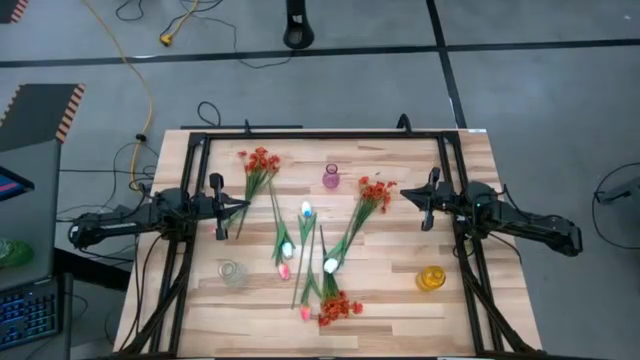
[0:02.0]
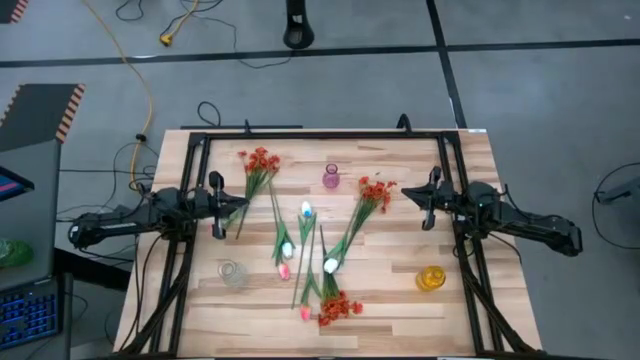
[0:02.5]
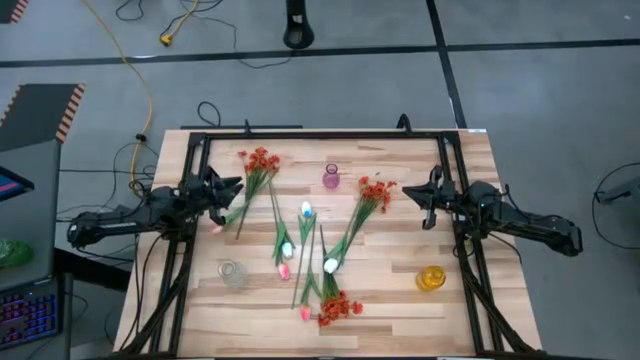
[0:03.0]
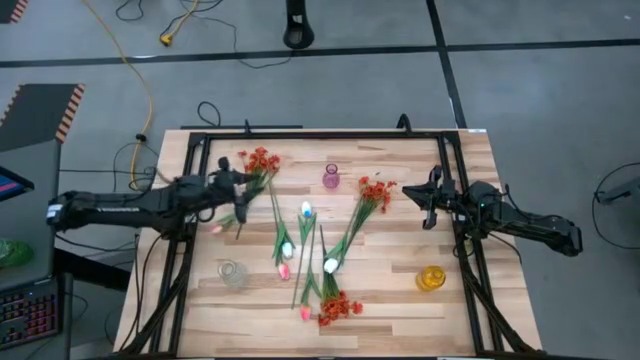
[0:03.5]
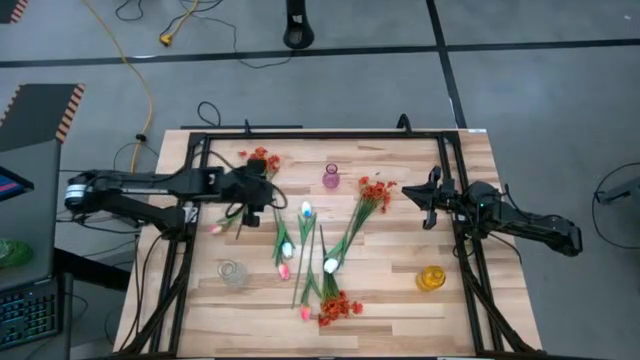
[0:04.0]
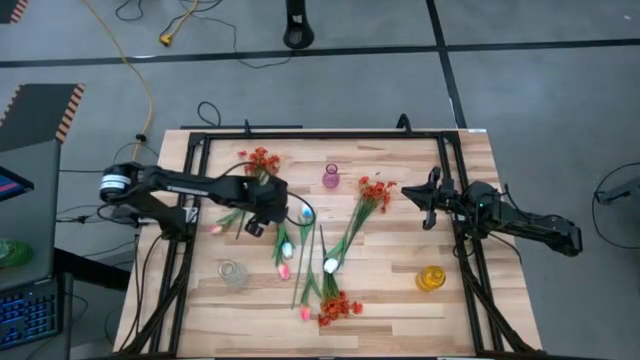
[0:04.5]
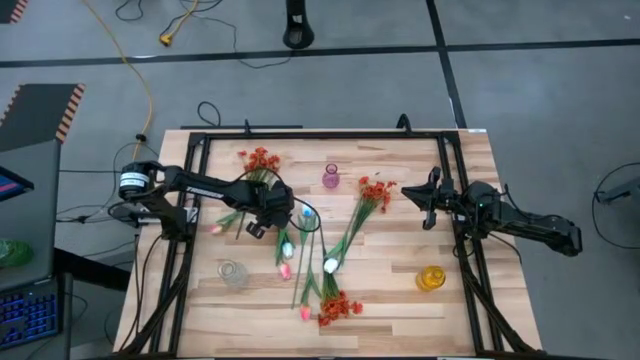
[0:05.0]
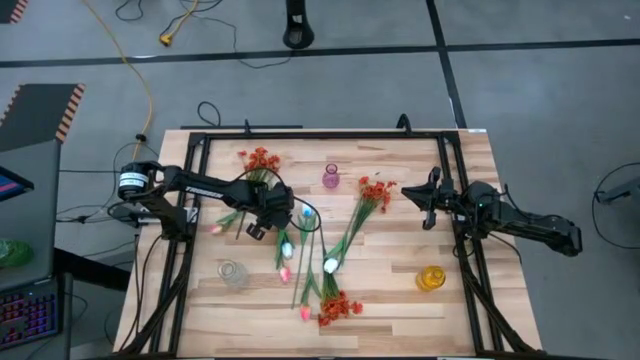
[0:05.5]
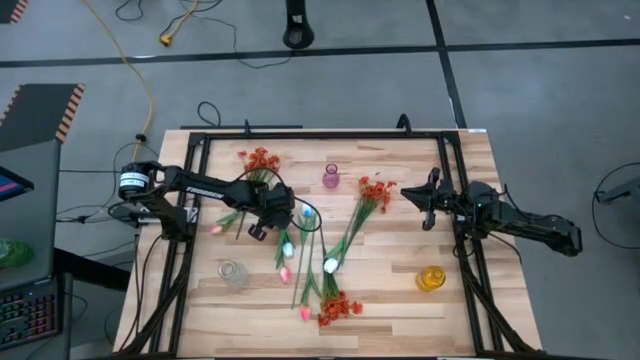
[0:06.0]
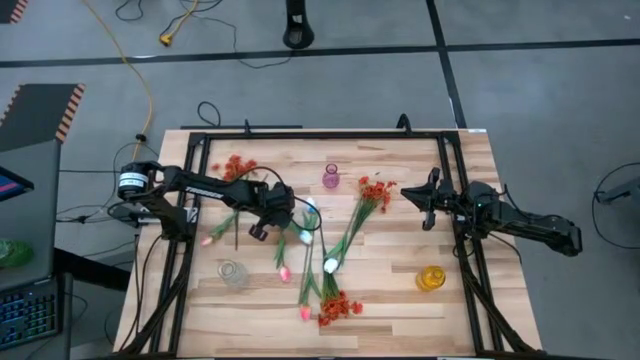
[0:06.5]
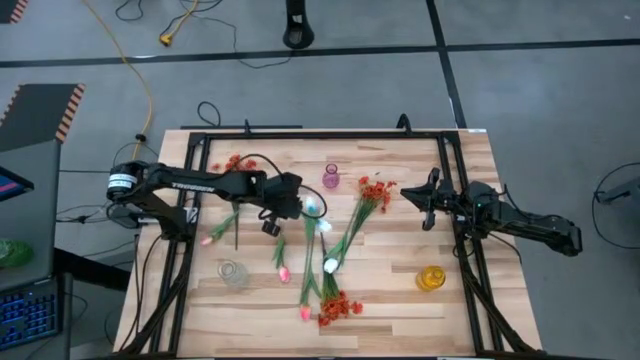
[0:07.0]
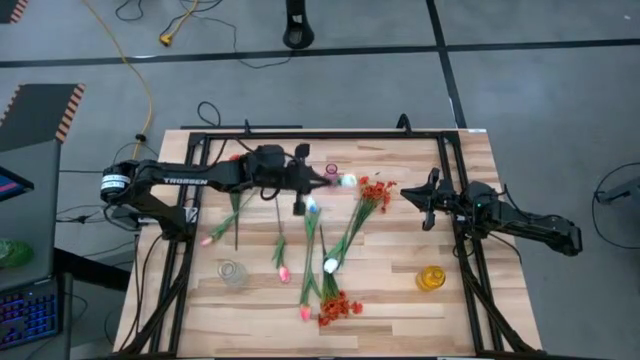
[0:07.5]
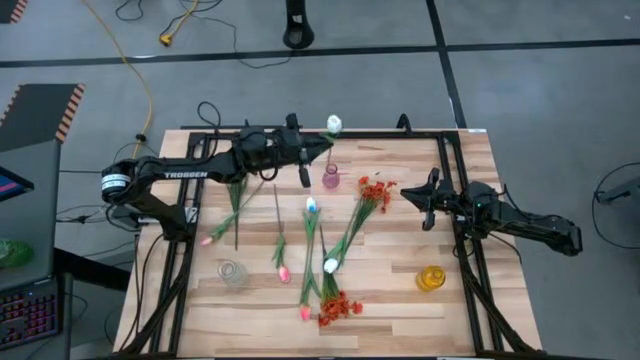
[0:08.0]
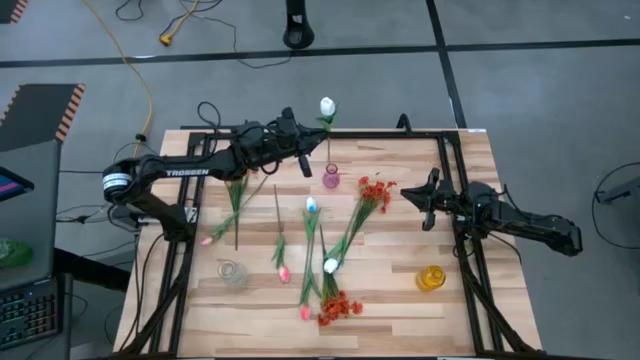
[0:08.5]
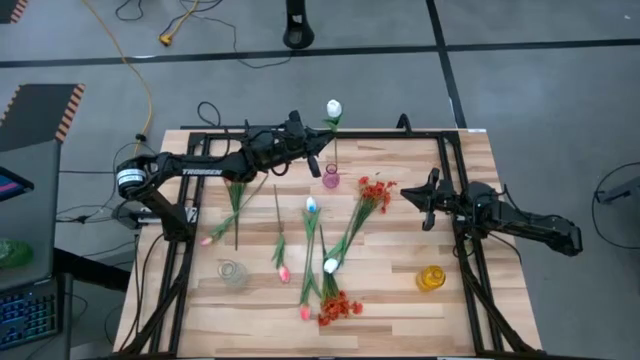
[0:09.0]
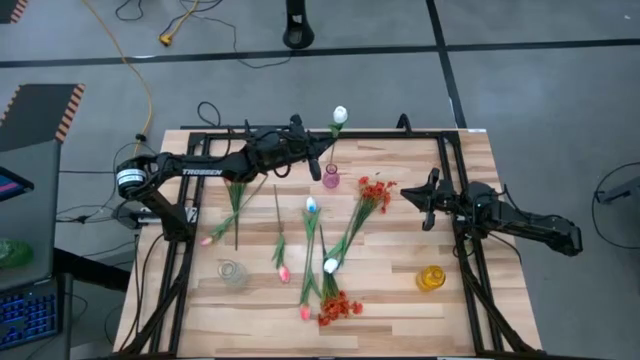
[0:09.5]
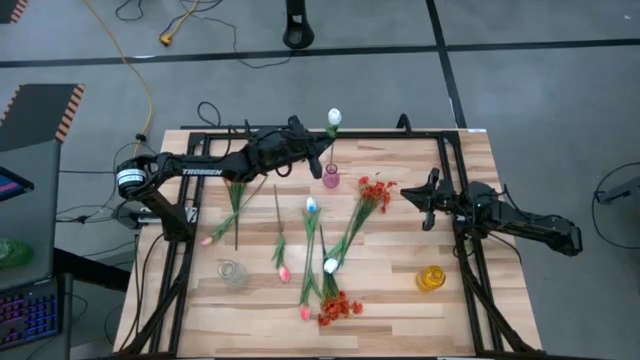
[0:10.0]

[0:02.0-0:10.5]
Task: Sort flowers into vase by color
Put the left white flower into the pink vase

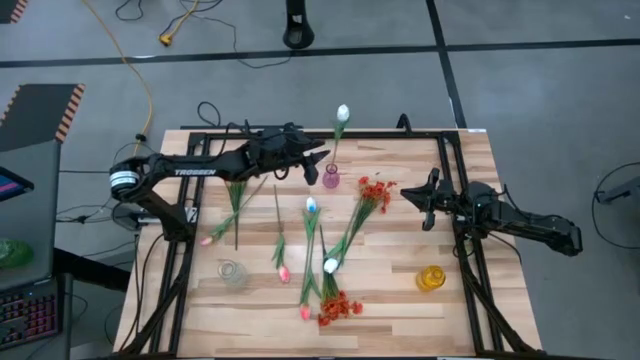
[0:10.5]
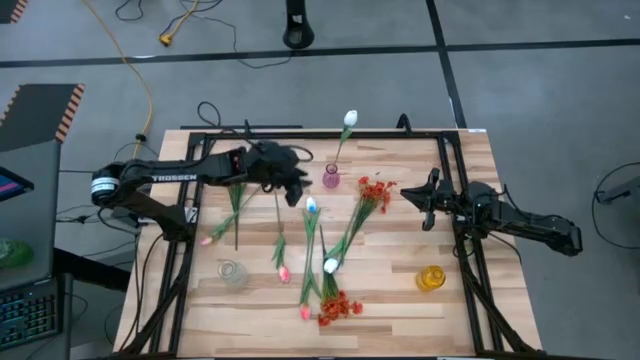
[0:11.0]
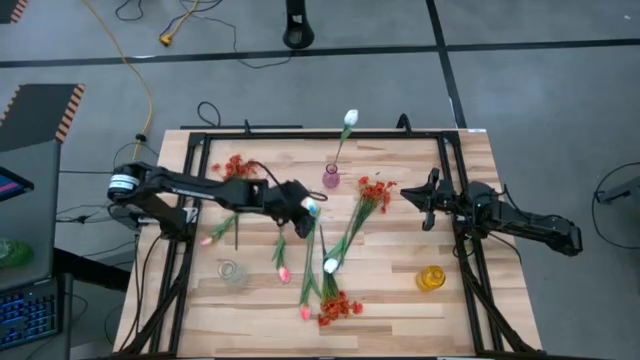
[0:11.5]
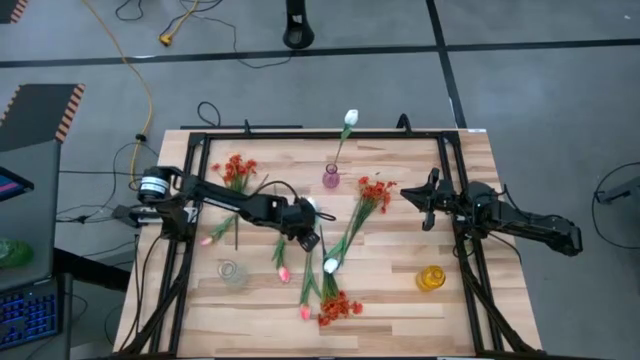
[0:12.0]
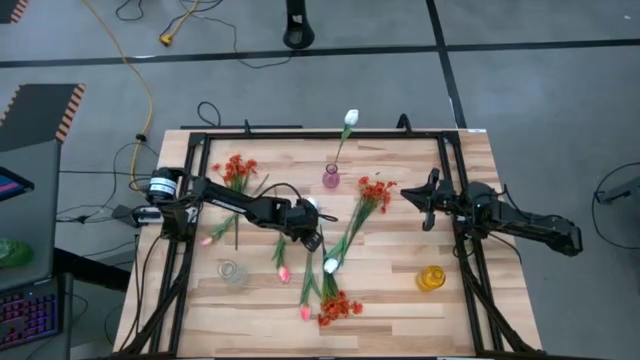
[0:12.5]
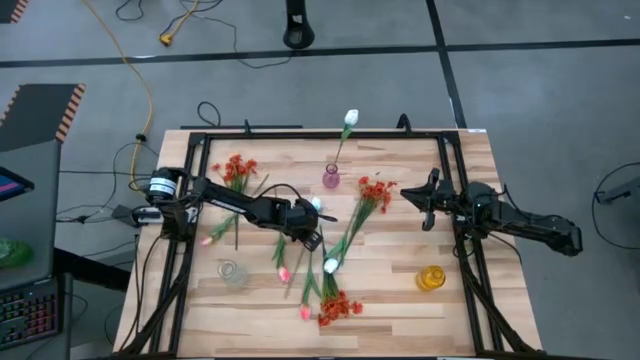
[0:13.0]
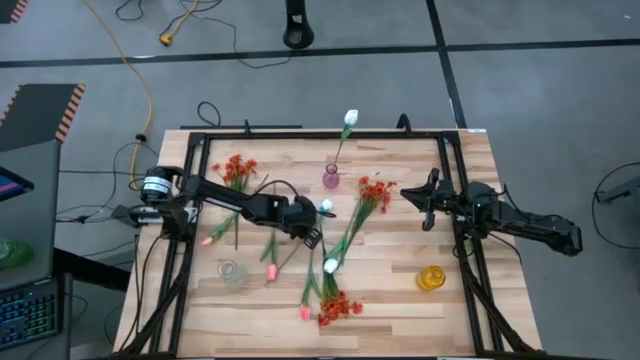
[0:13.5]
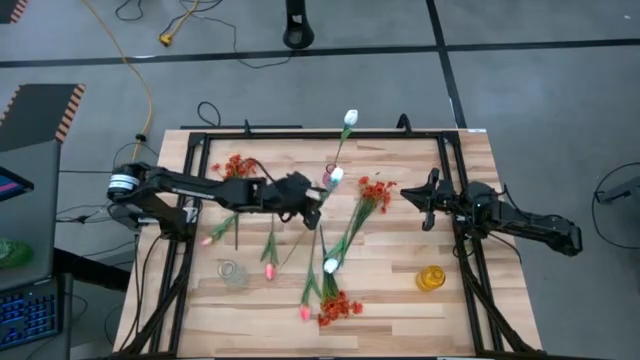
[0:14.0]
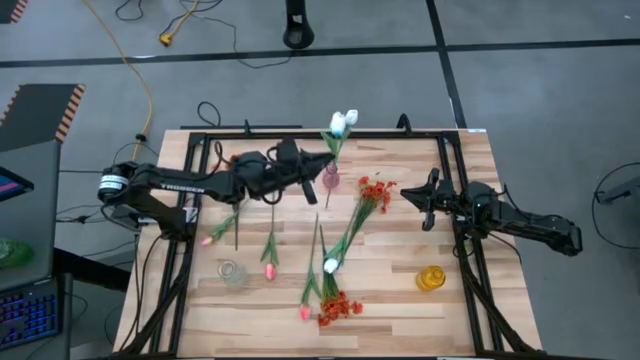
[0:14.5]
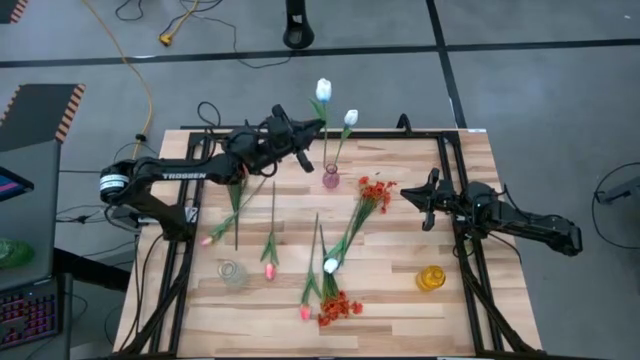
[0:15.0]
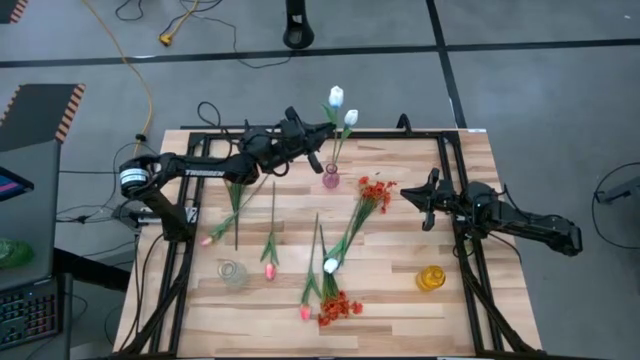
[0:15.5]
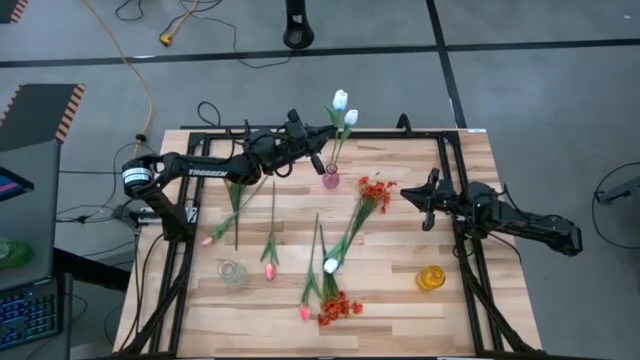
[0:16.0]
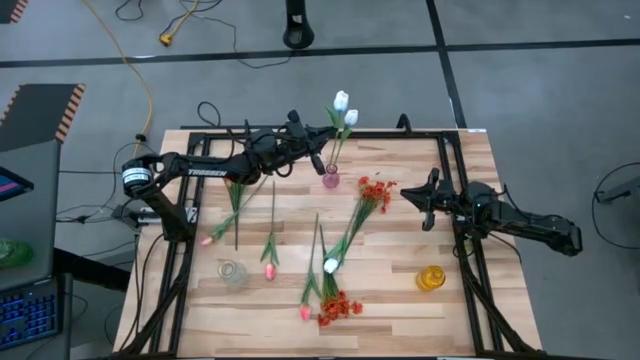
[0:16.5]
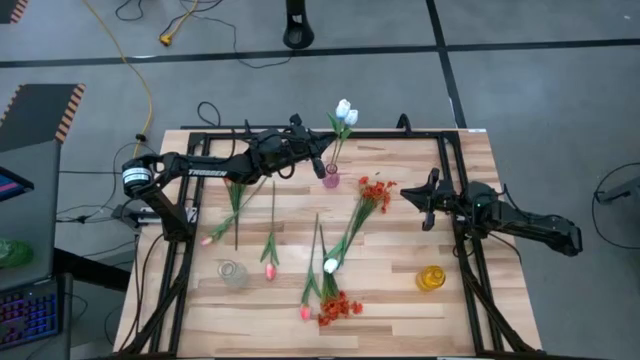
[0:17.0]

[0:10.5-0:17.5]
Put the left white flower into the pink vase

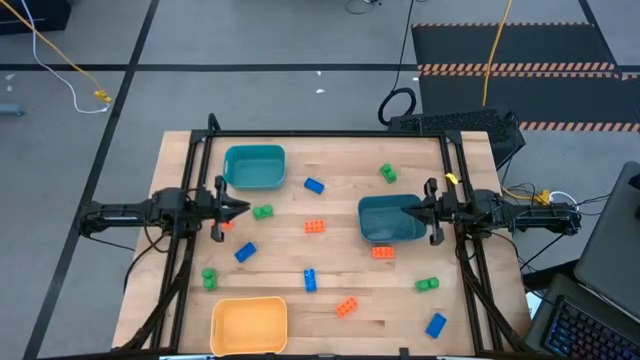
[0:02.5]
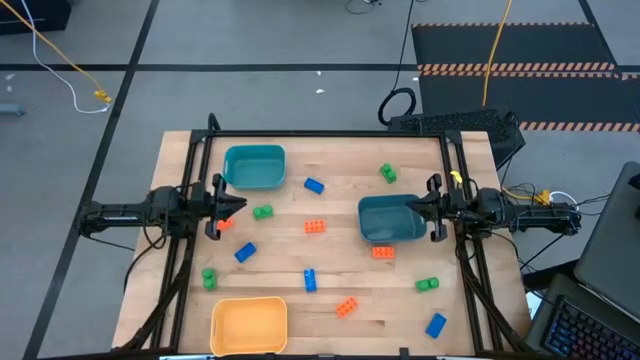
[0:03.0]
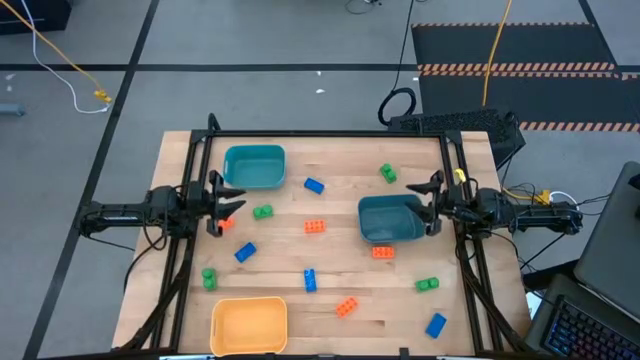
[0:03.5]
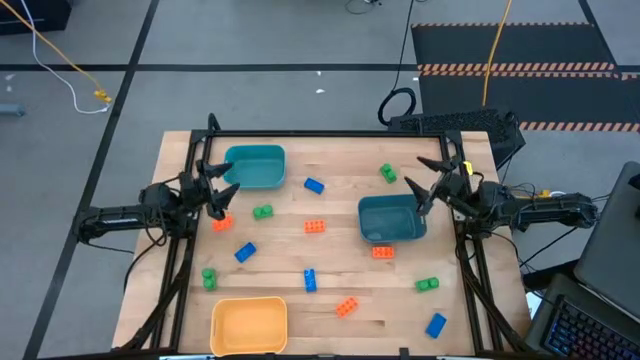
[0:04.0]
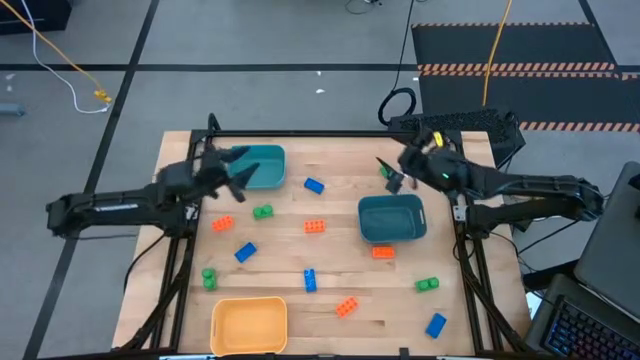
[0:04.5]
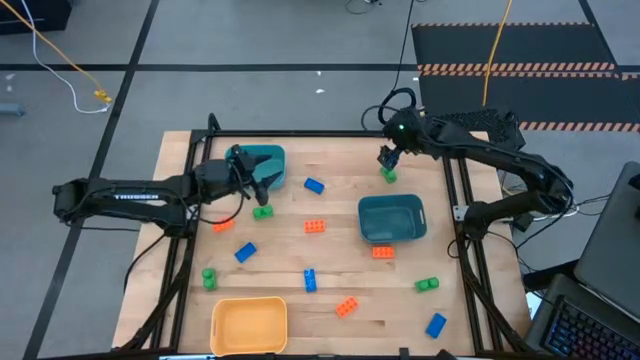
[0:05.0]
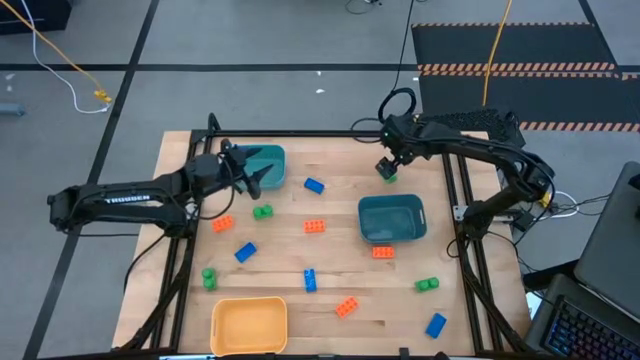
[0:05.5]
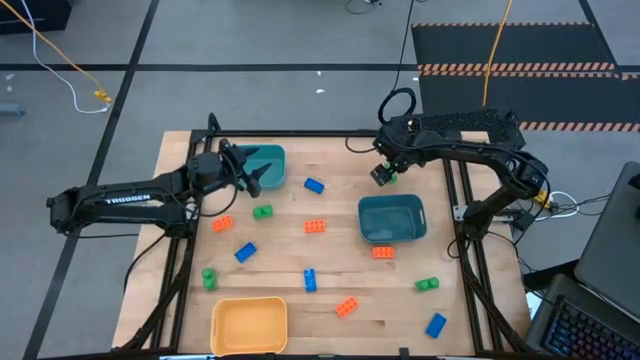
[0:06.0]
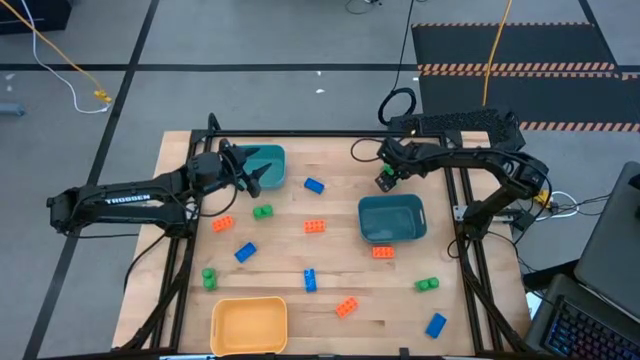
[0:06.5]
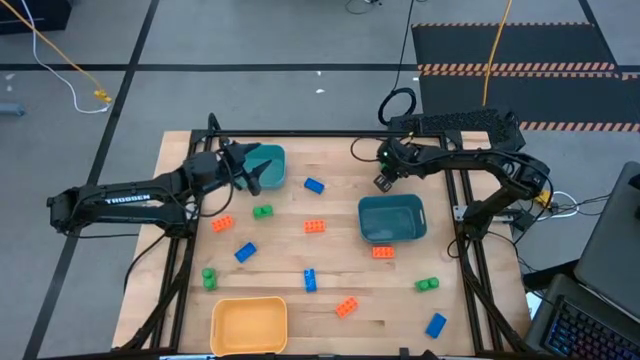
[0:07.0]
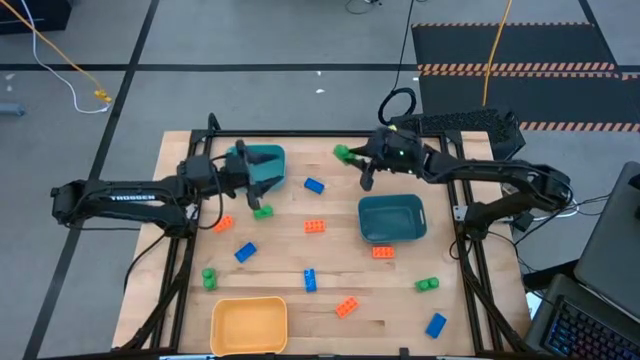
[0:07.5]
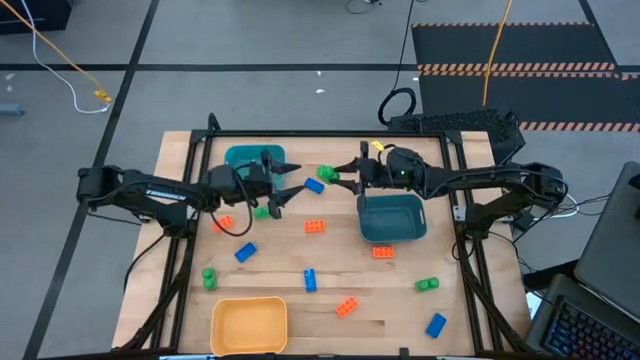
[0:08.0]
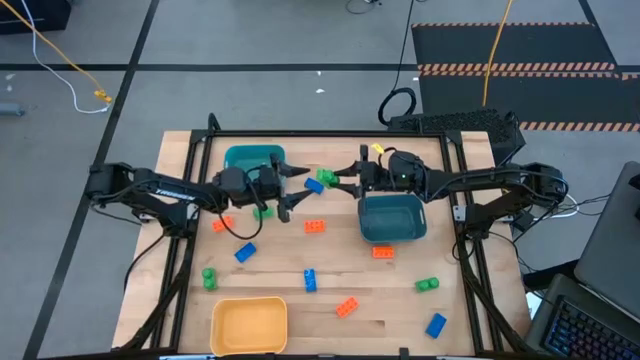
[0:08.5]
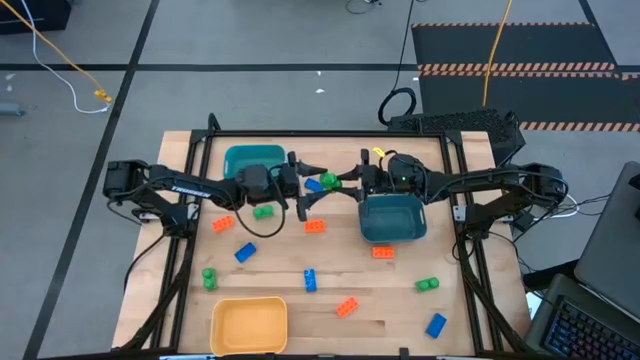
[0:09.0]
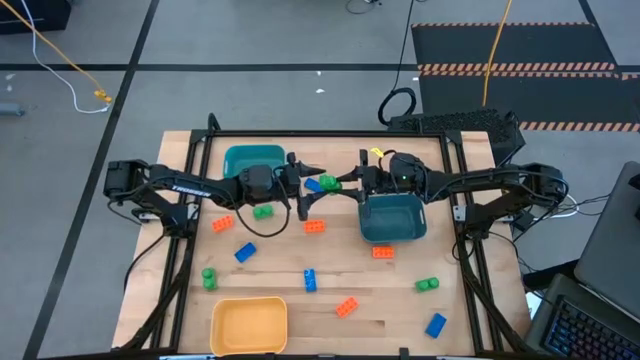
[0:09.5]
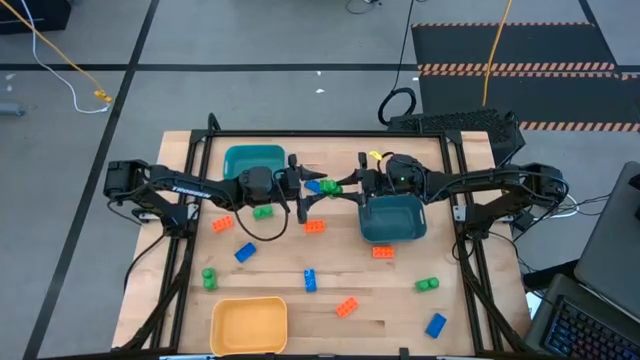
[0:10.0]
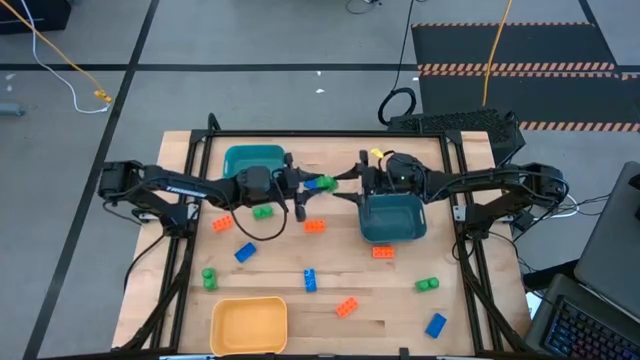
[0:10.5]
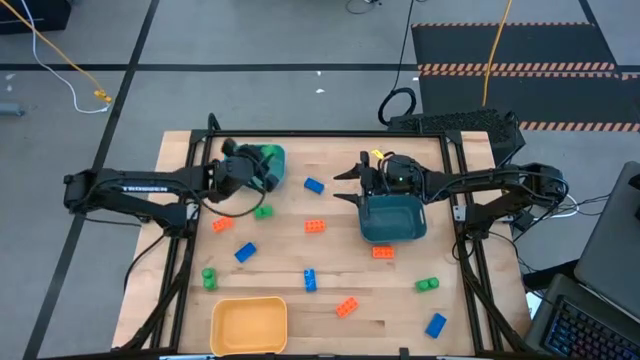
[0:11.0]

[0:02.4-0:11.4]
Task: Sort & place blocks by color
Put the green game piece into the light blue bin
